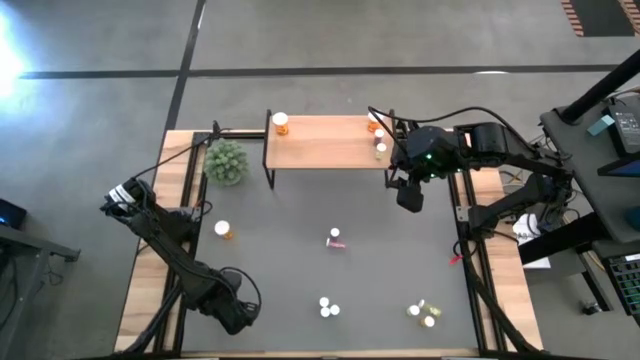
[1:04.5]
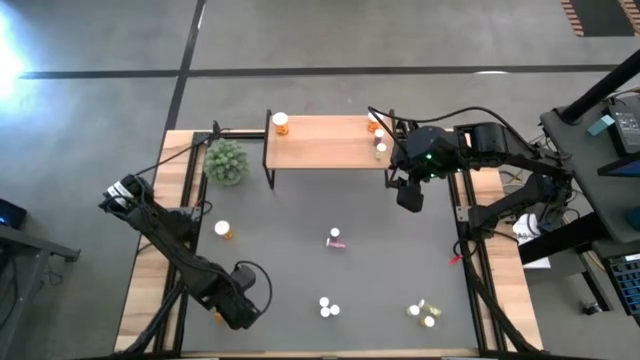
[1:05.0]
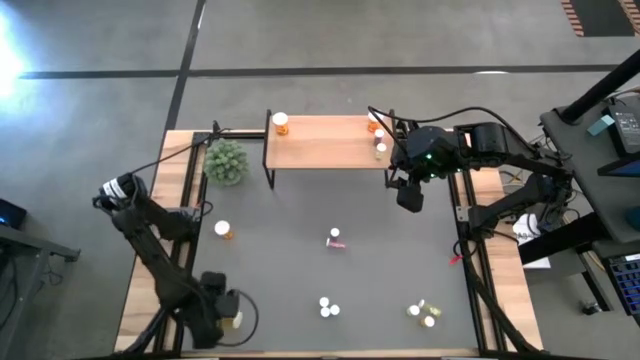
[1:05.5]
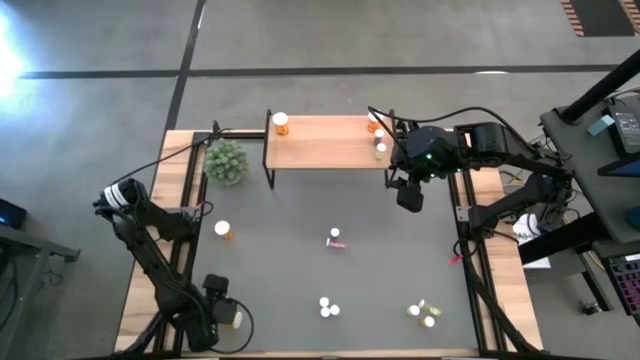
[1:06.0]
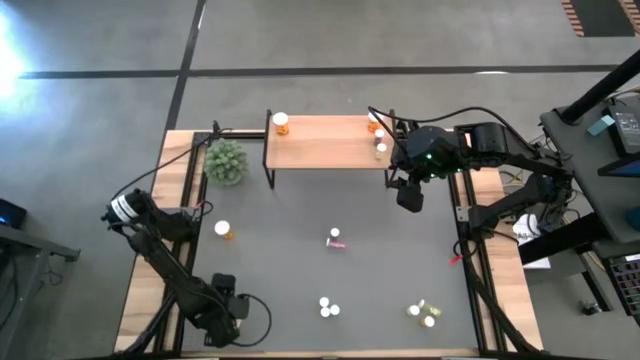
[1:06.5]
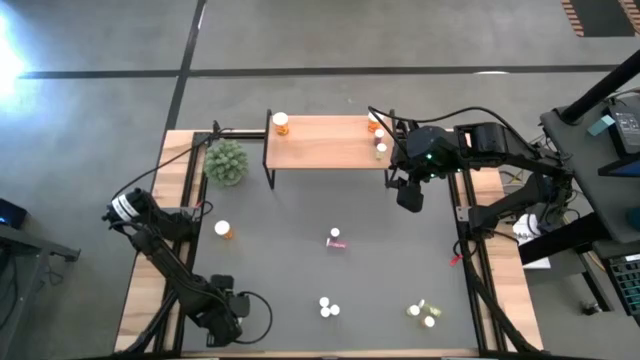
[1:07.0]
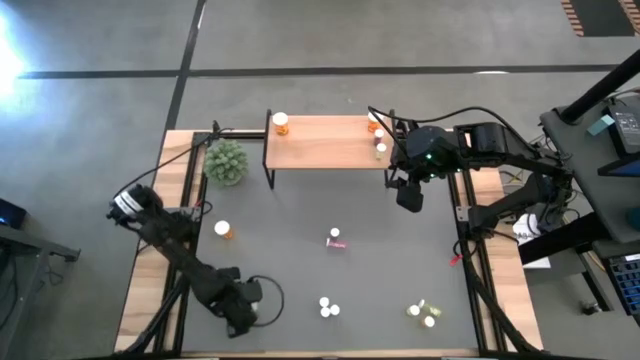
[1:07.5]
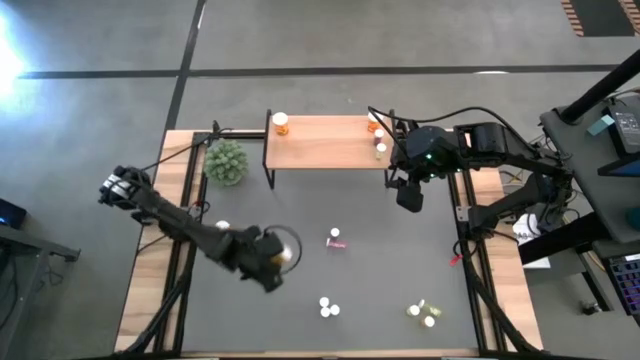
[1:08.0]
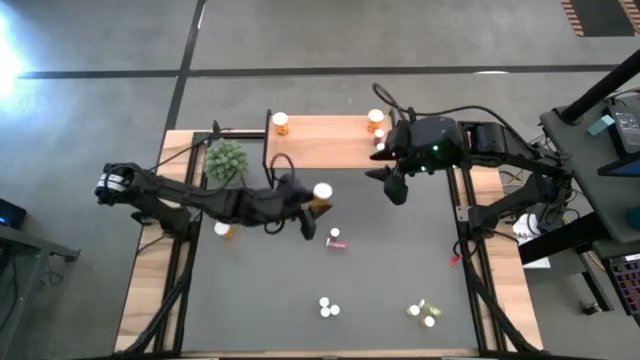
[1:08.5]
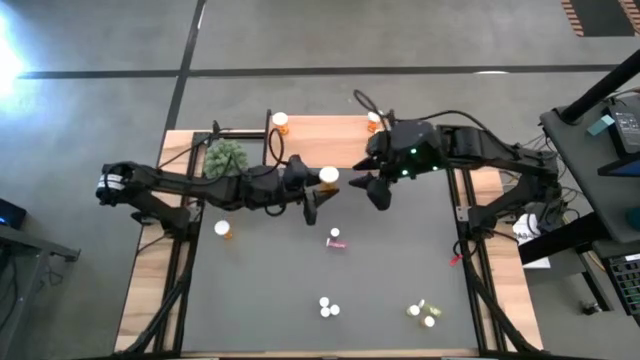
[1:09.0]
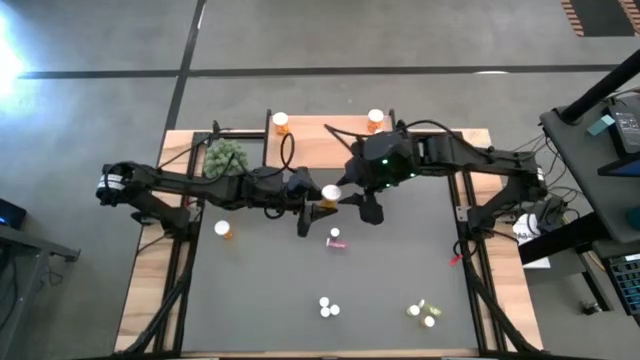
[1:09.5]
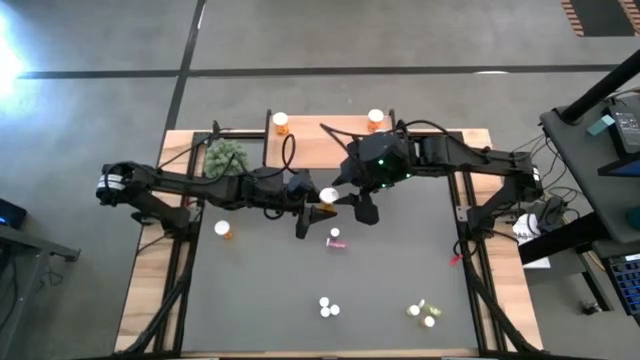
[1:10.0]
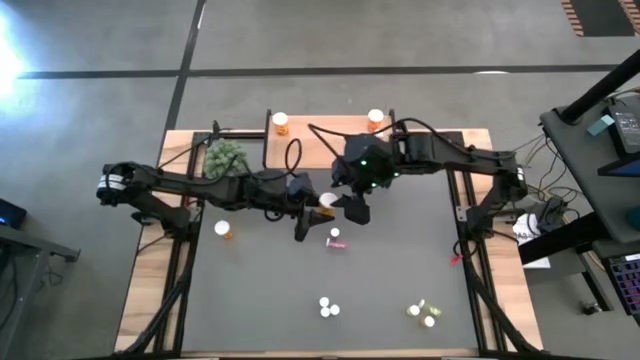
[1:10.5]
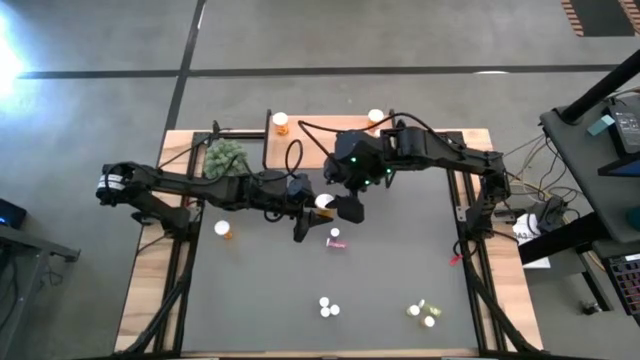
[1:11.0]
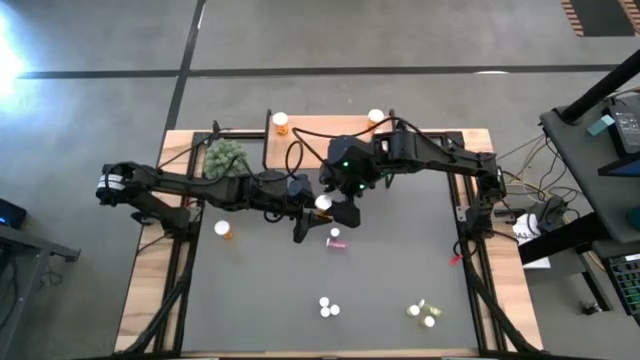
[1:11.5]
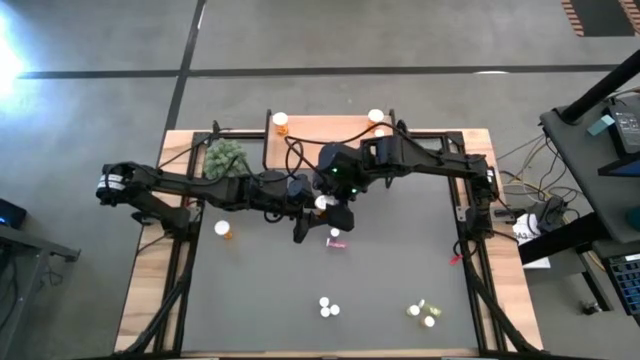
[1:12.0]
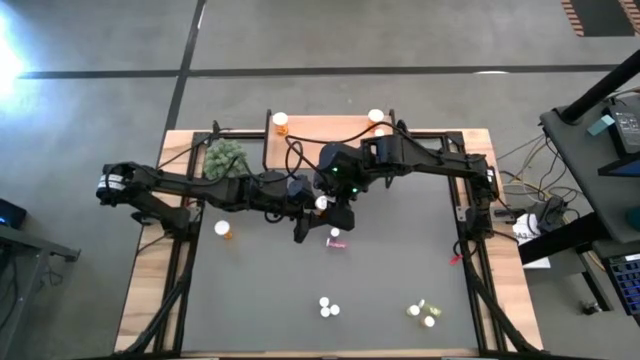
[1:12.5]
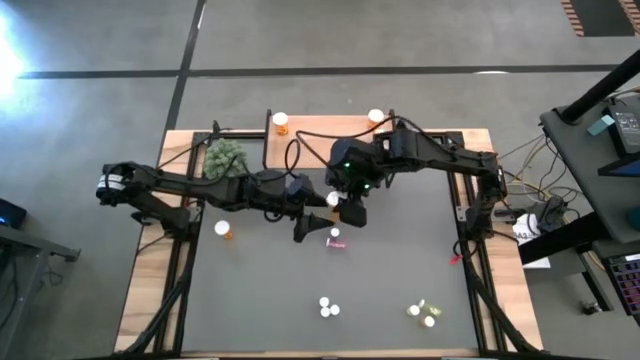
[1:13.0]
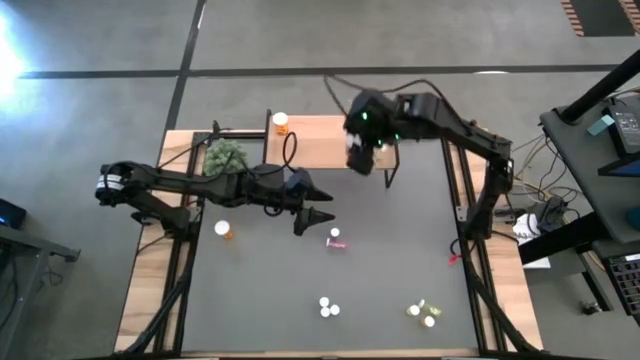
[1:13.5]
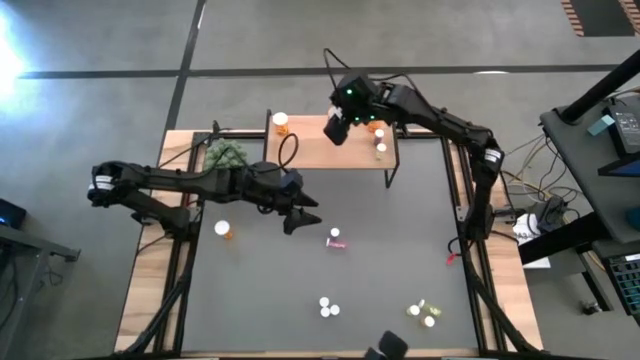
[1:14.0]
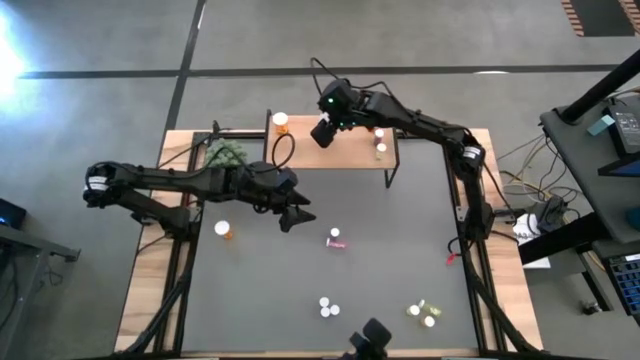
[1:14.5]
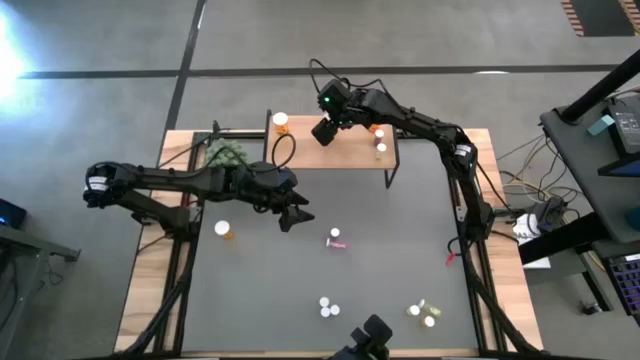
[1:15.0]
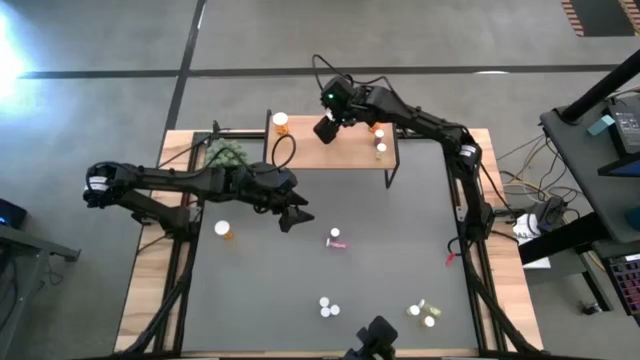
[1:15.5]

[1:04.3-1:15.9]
Task: Pick and place medicine bottles onto shelf by color
Put the large orange pill bottle on the shelf

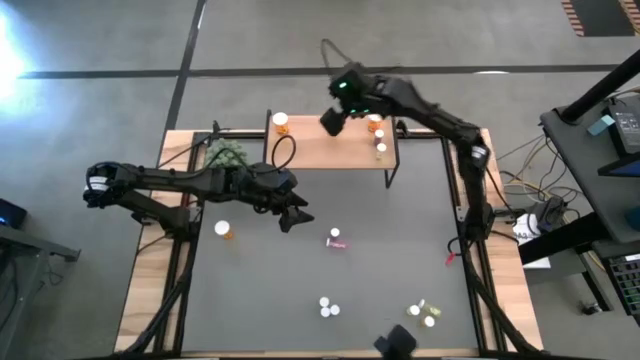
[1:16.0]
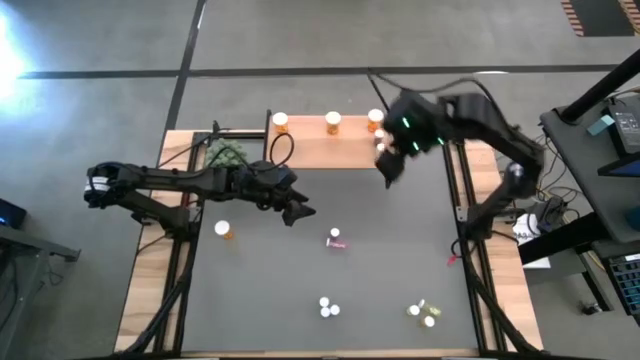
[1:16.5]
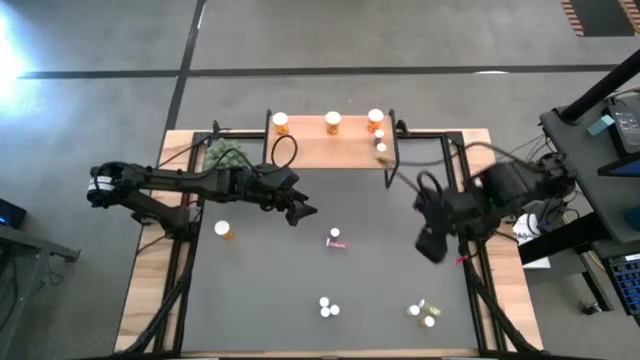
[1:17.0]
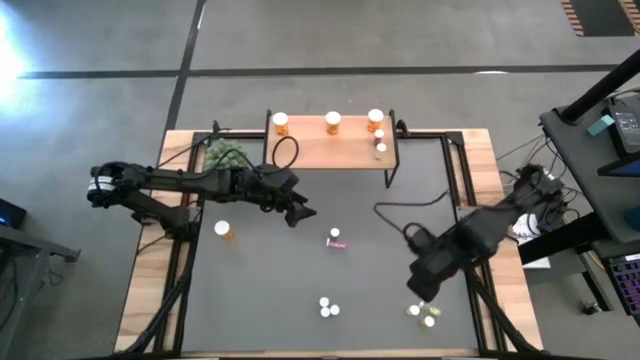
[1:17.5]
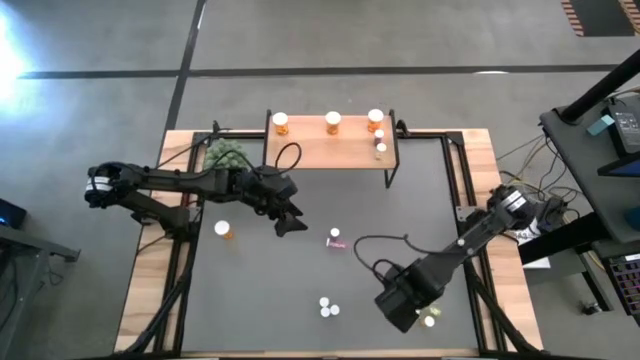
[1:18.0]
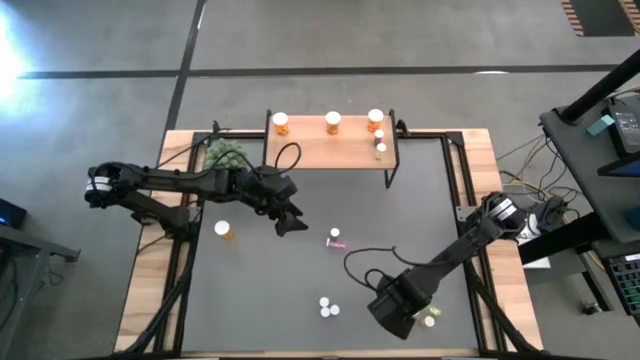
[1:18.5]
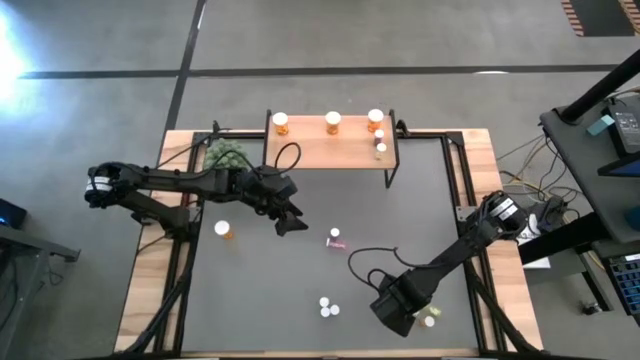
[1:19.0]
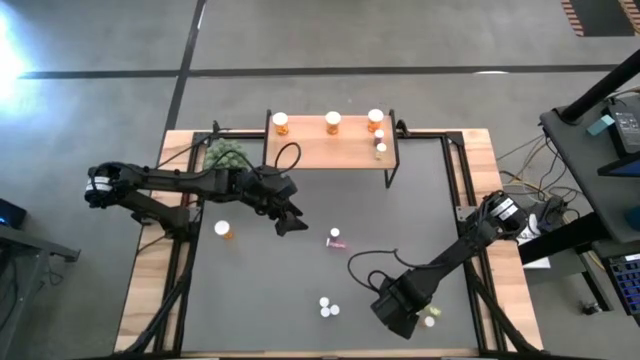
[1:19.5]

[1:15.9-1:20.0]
Put the small yellow pill bottle on the shelf

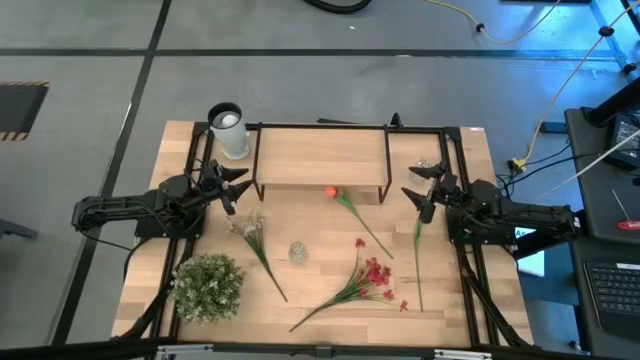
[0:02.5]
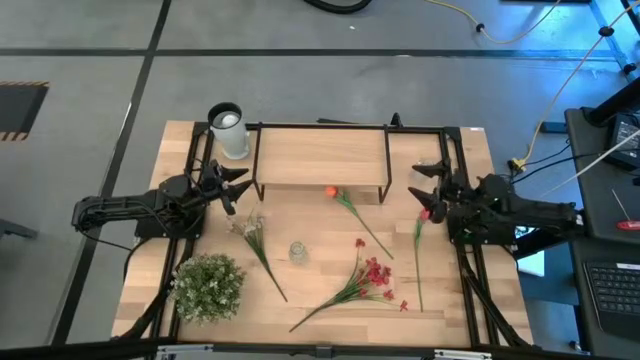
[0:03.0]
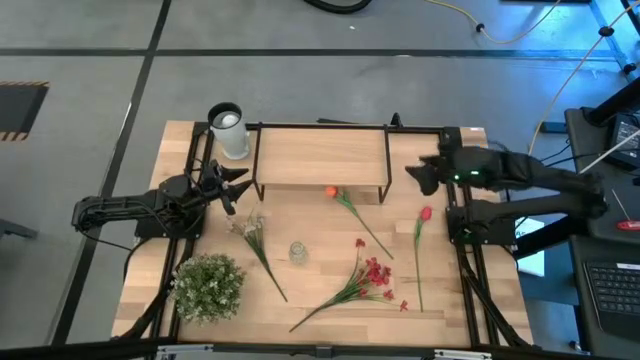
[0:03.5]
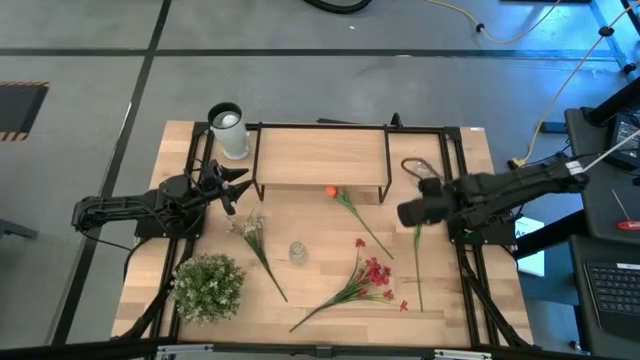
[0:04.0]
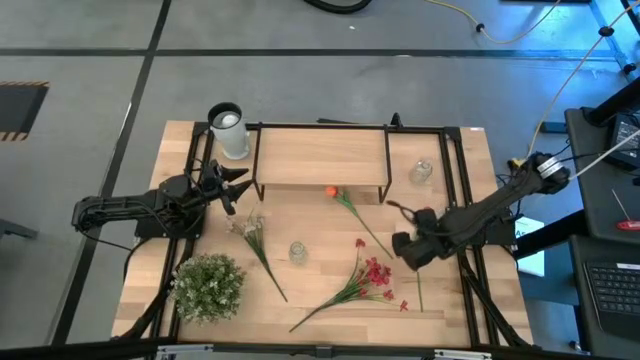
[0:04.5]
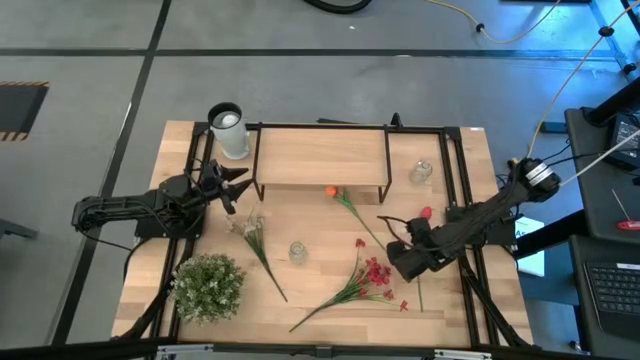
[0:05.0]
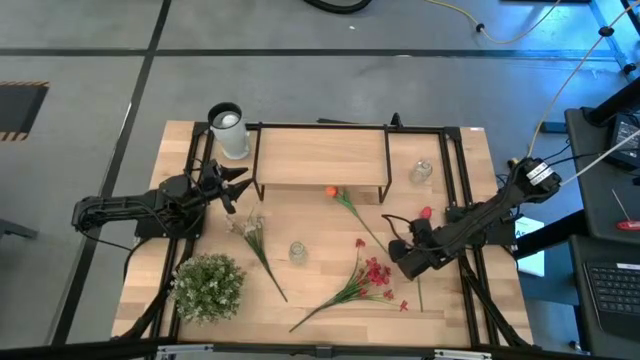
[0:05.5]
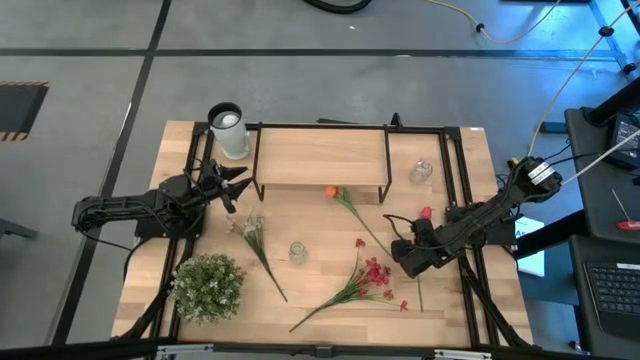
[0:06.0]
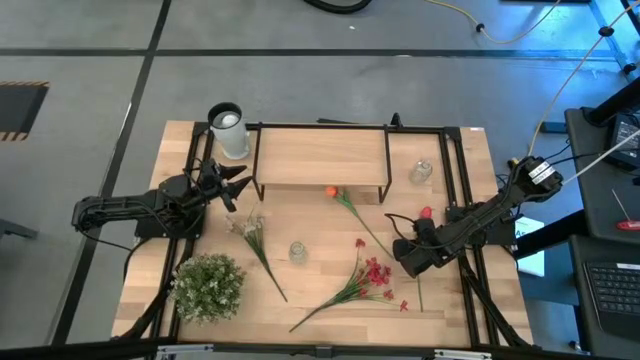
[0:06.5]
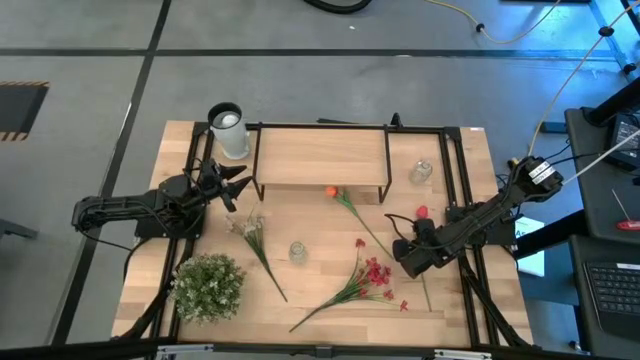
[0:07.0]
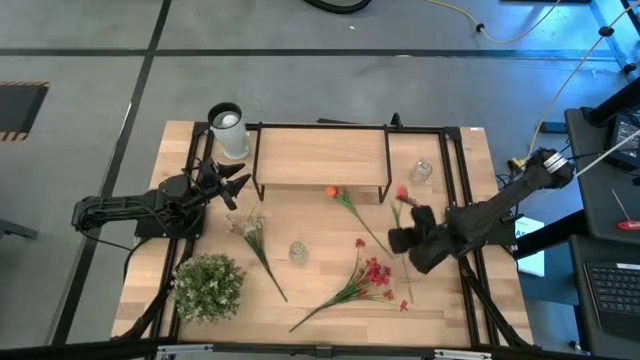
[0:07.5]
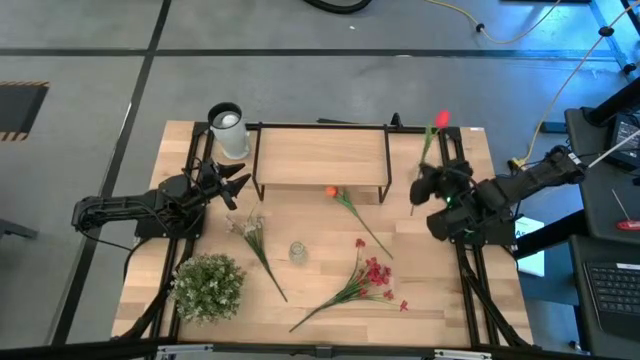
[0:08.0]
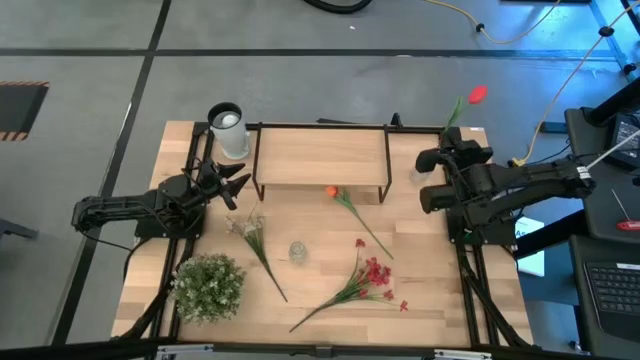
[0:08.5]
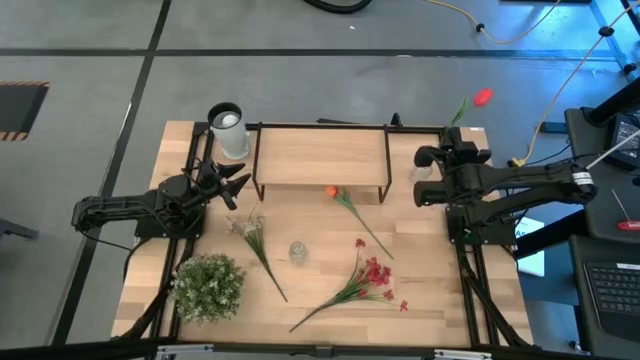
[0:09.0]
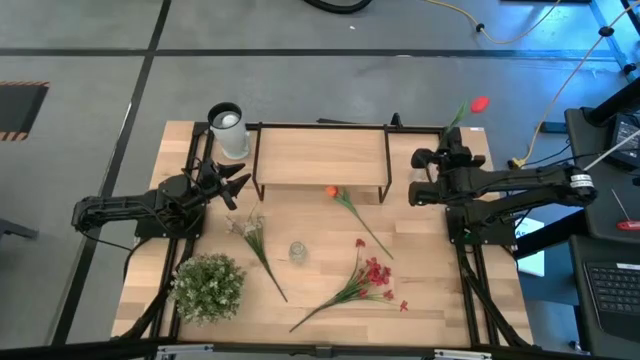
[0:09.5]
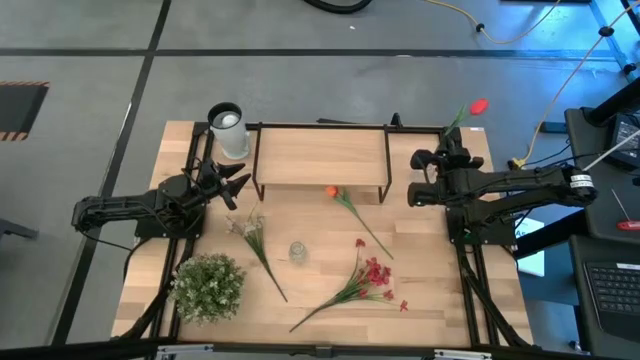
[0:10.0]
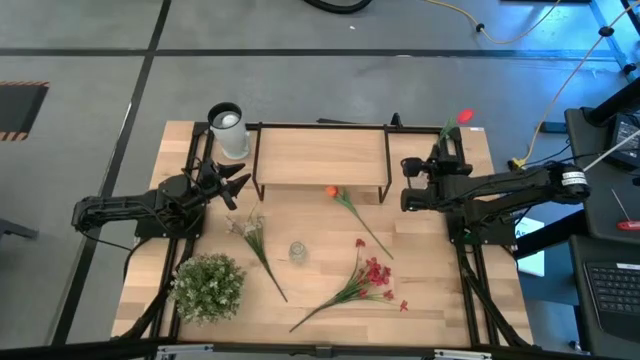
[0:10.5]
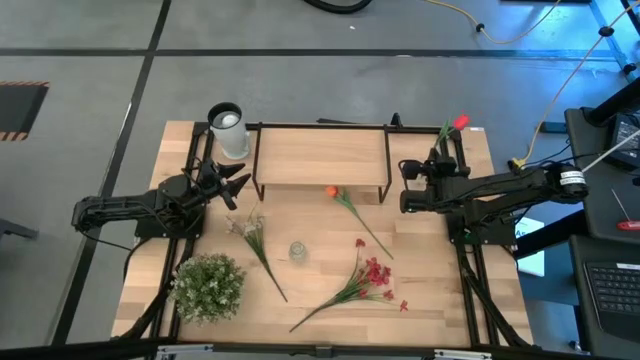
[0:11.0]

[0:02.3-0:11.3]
Task: Pick and place flowers into a vace then onto a shelf
Put the red tulip into the top transparent vase
